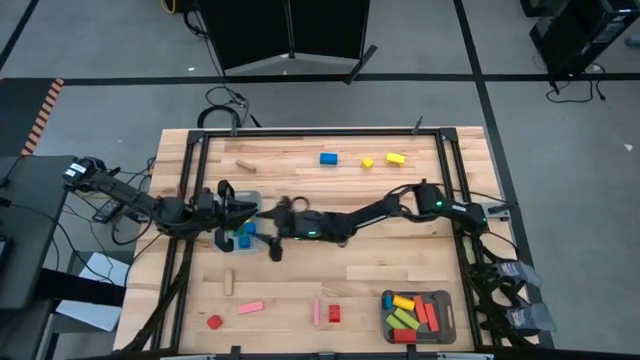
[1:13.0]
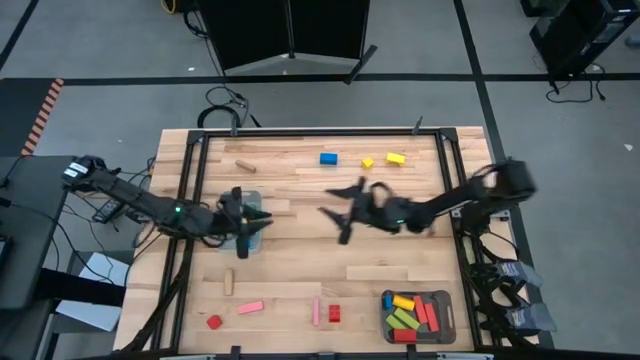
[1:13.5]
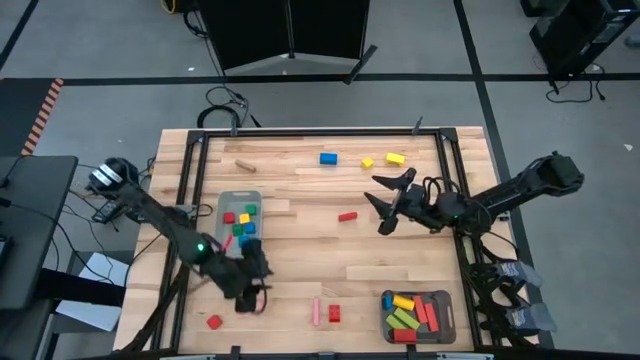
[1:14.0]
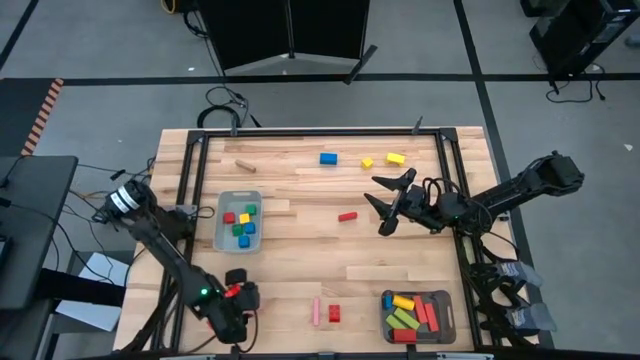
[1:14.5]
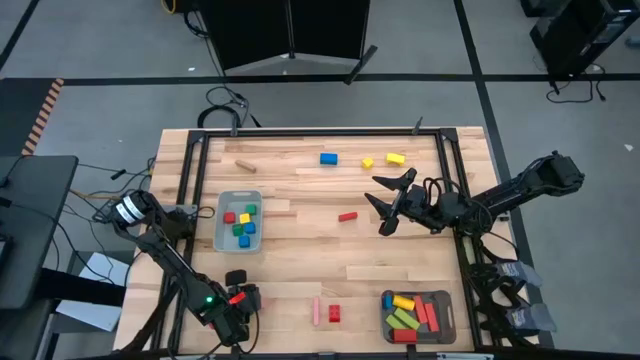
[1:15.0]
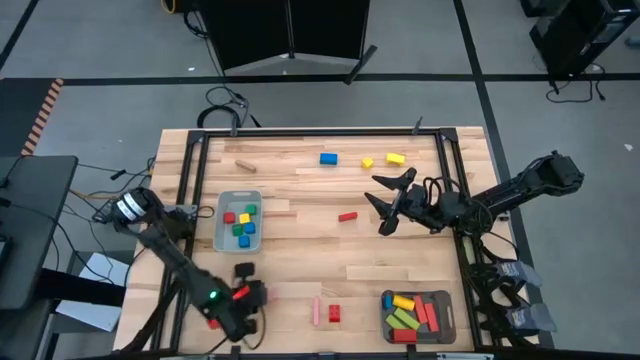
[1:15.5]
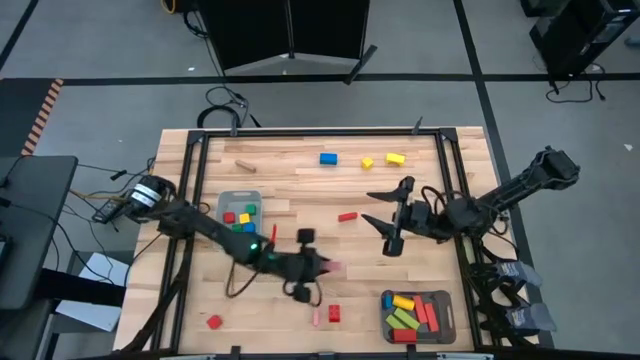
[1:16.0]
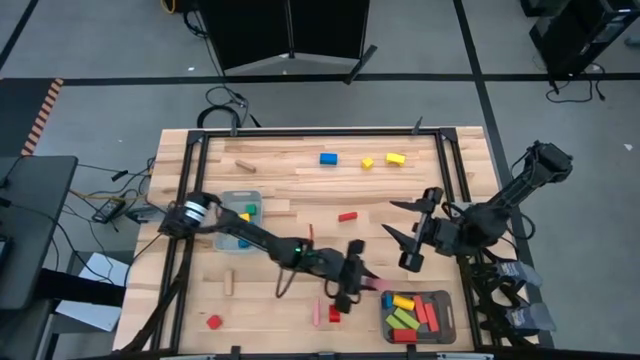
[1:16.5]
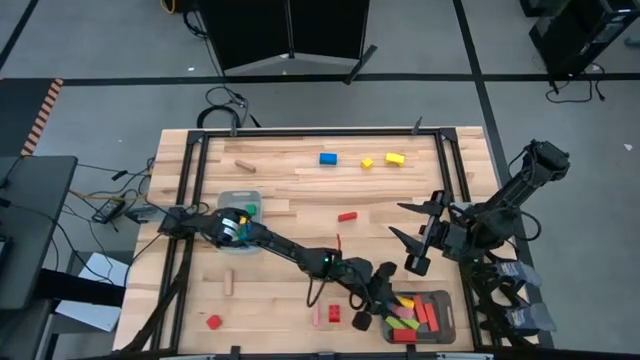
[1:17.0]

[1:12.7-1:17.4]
Task: Sort blocks by size
Put the left pink block into the black bin

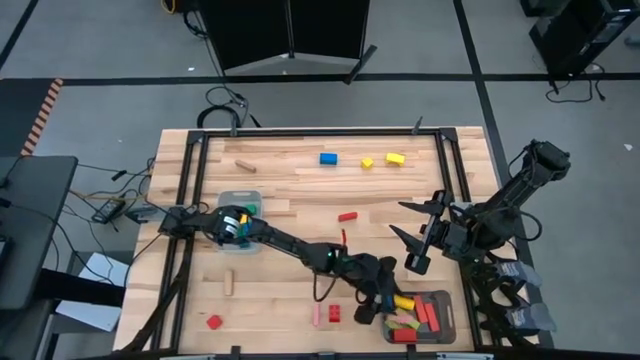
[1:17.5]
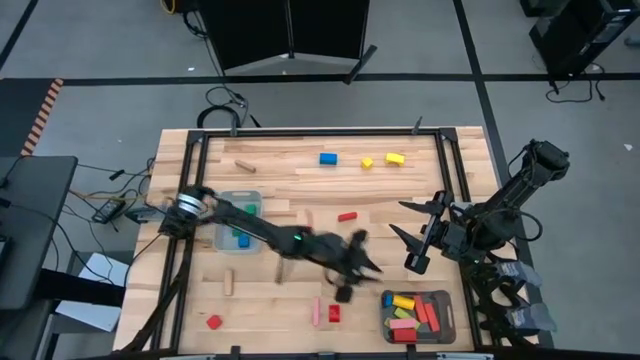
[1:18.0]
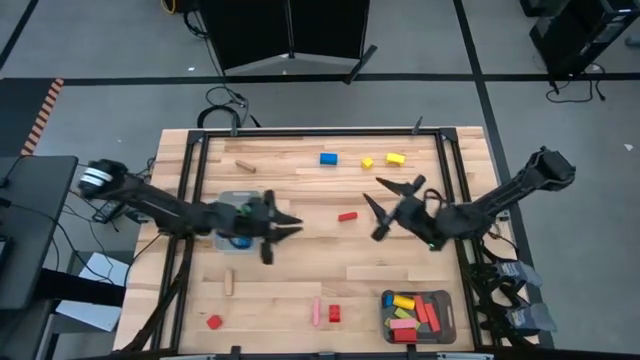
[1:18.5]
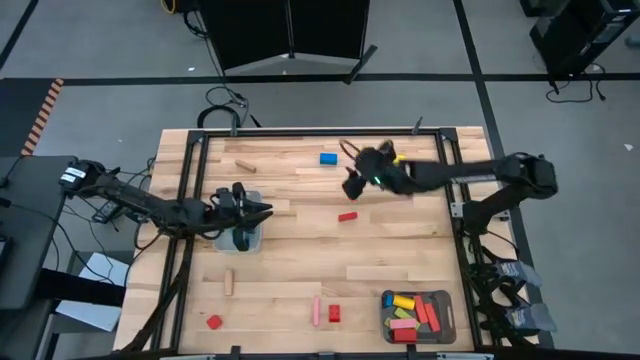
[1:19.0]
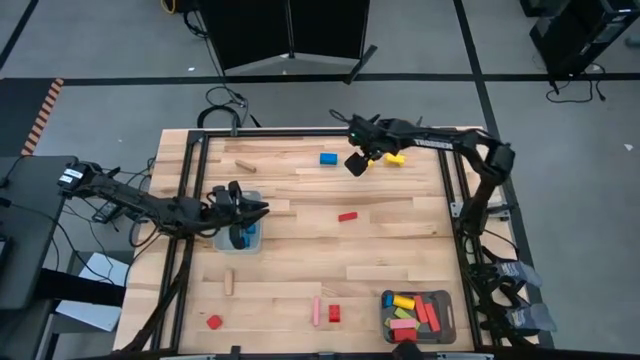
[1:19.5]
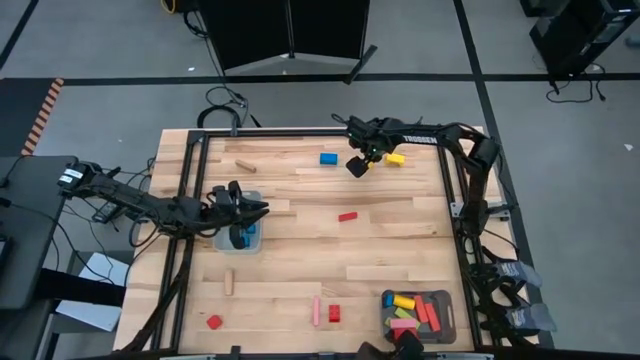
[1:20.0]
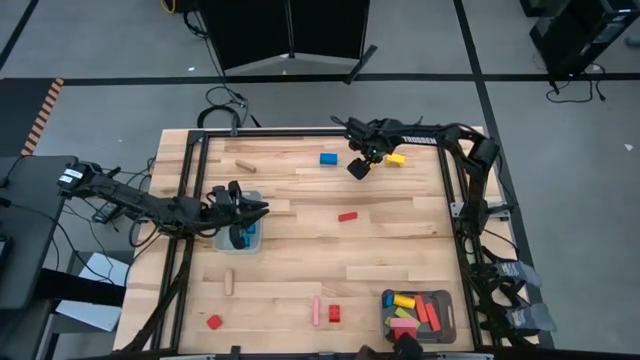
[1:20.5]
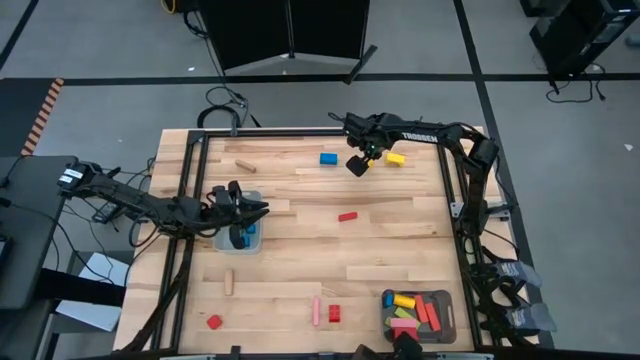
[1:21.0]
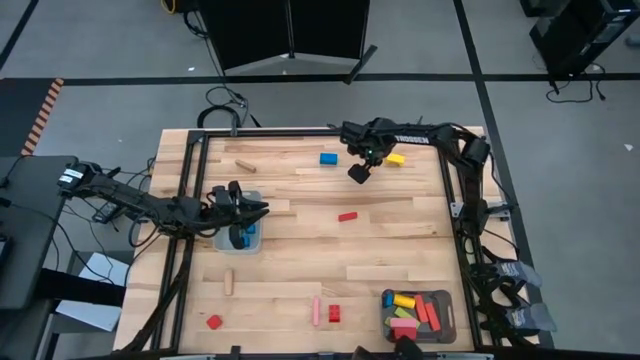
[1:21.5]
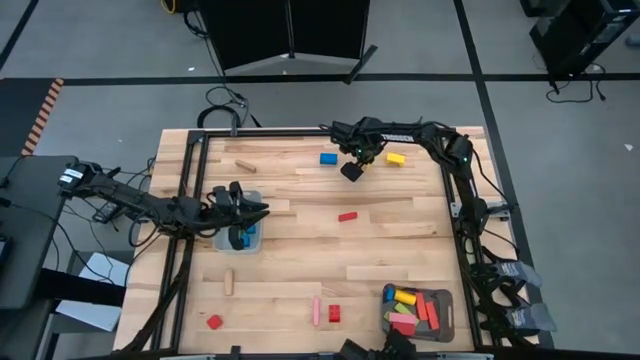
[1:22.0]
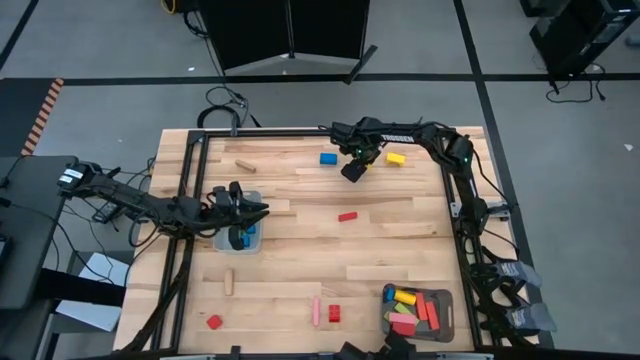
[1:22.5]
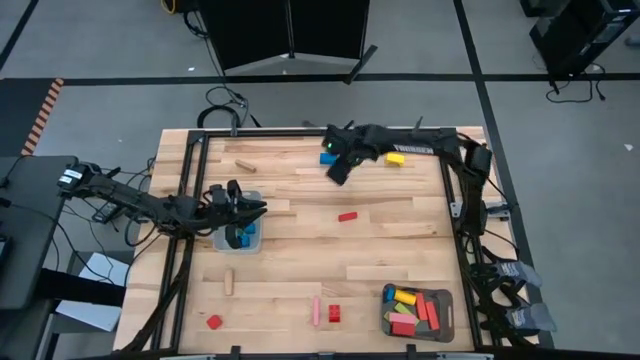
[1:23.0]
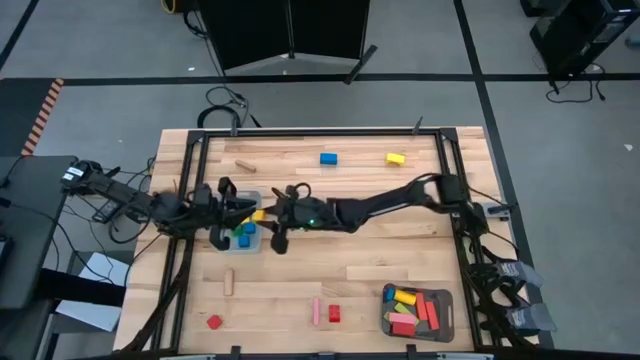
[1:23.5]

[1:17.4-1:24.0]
Put the left yellow block into the grey bin

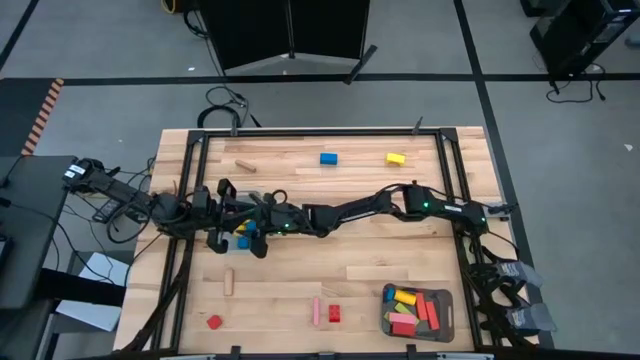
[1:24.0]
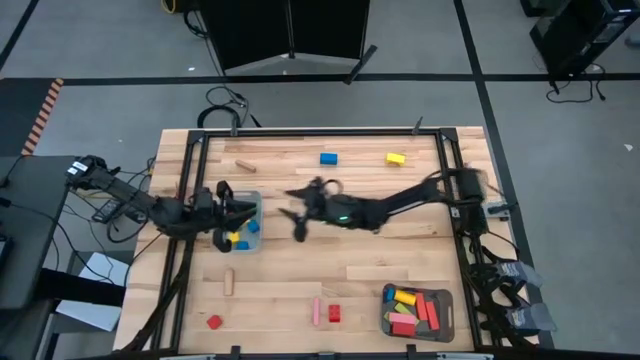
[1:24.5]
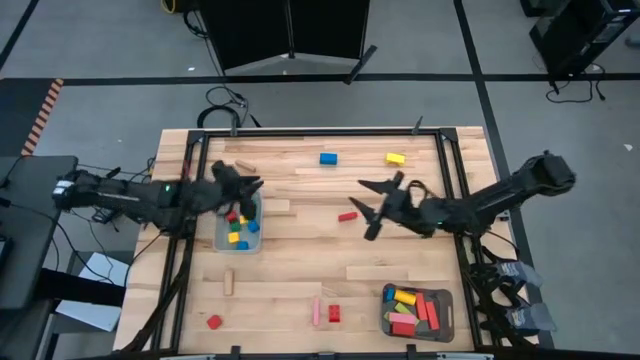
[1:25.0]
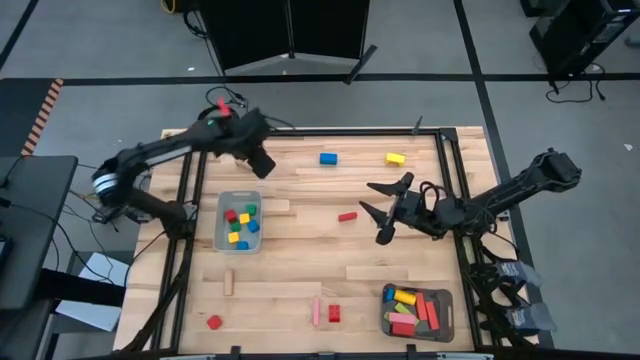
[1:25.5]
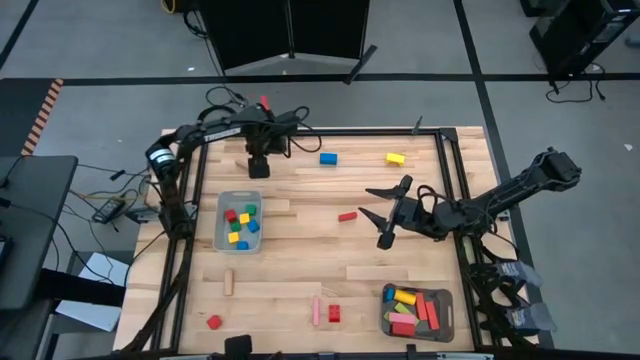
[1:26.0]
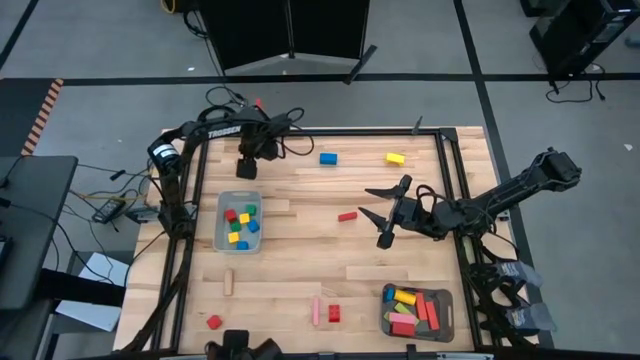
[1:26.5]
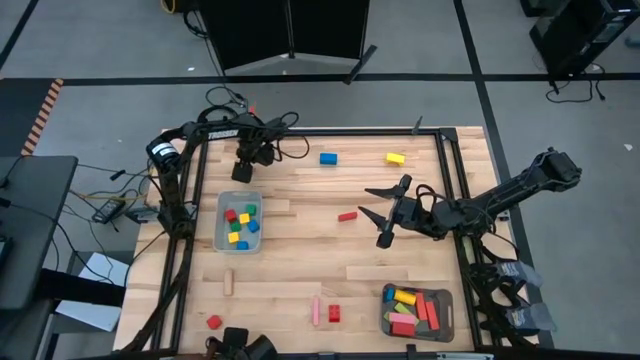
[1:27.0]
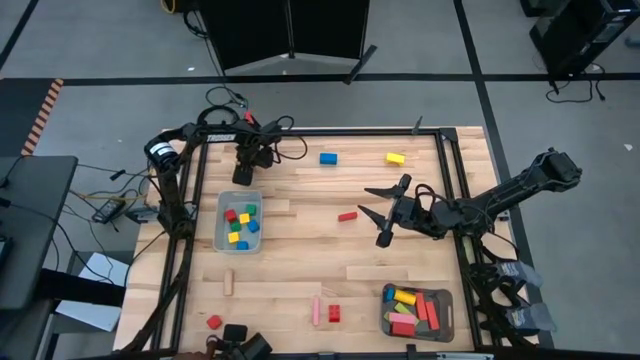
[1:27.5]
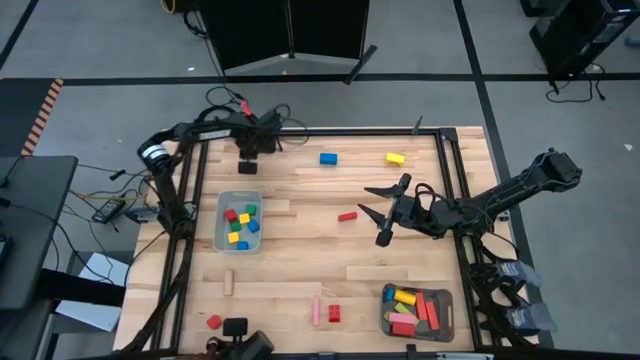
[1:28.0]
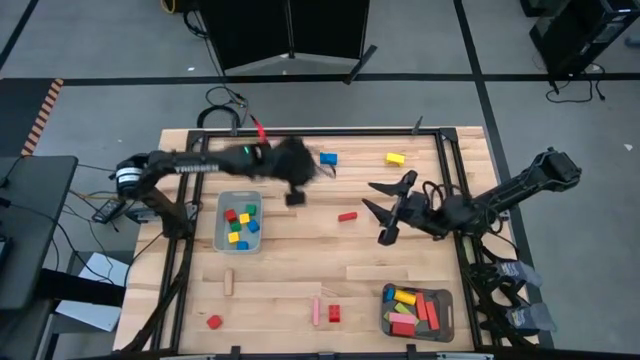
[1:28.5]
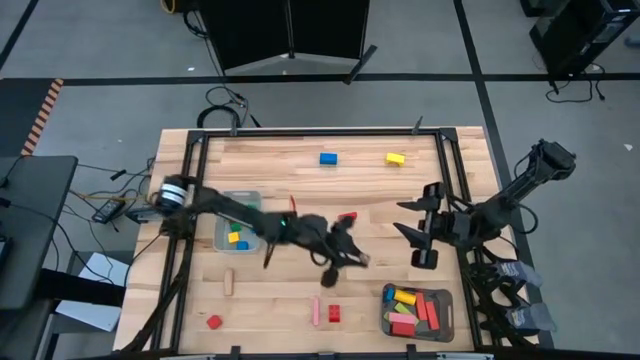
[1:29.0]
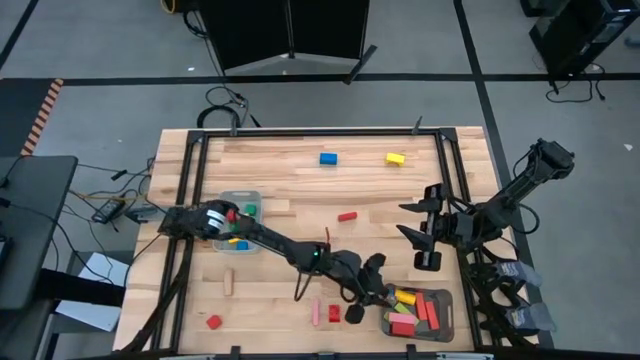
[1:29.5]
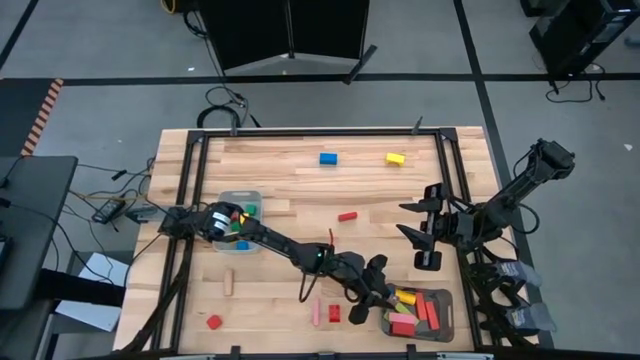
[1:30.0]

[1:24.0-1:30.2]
Put the top brown block into the black bin

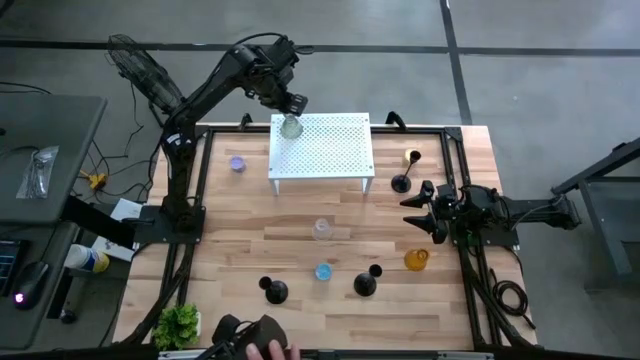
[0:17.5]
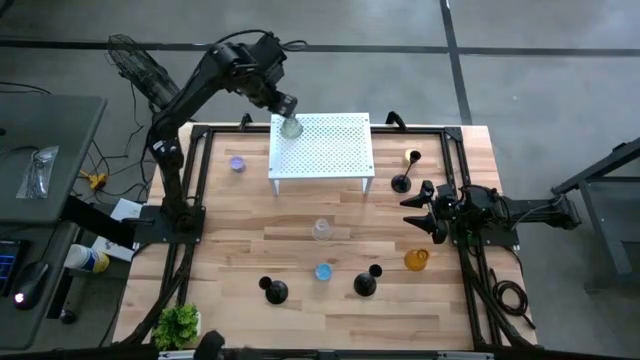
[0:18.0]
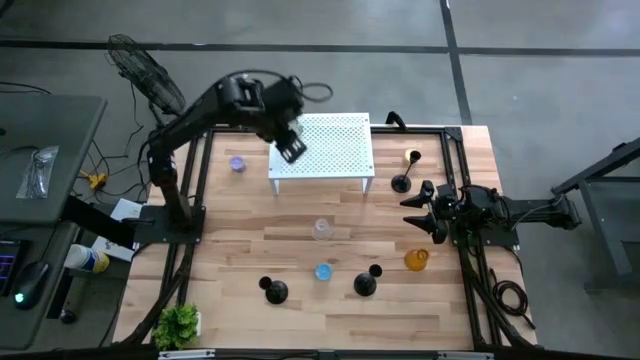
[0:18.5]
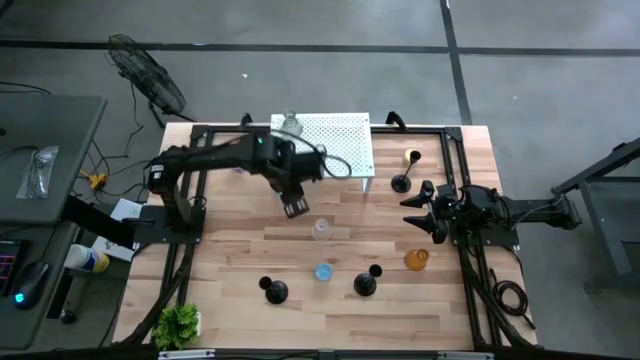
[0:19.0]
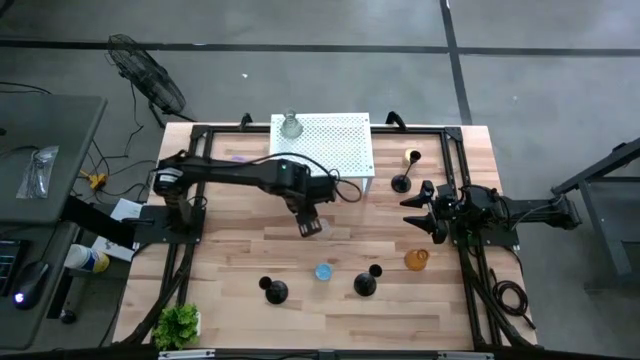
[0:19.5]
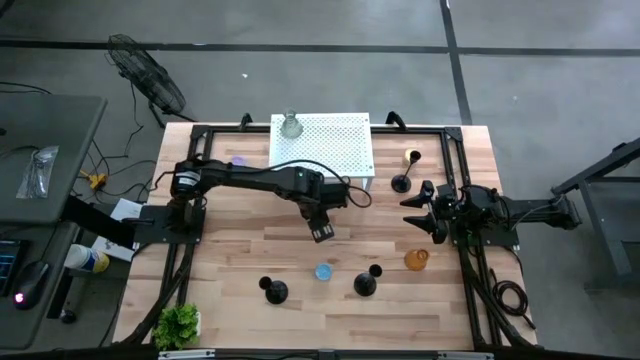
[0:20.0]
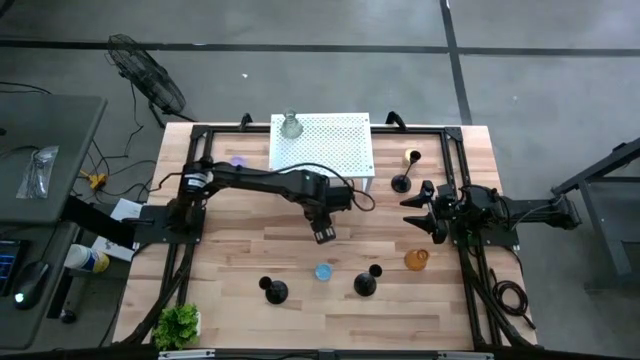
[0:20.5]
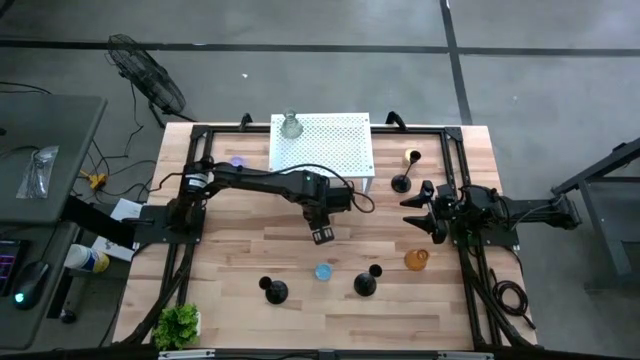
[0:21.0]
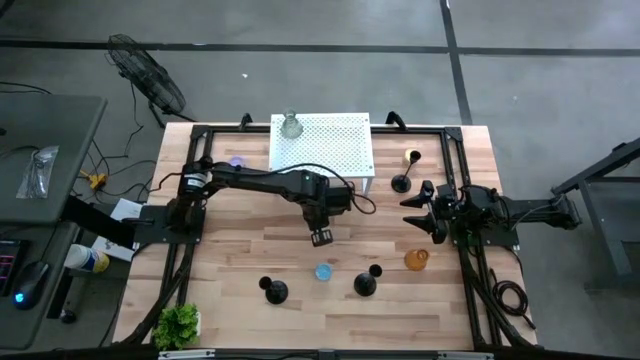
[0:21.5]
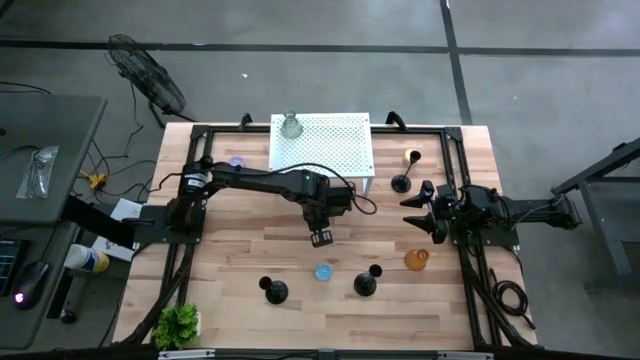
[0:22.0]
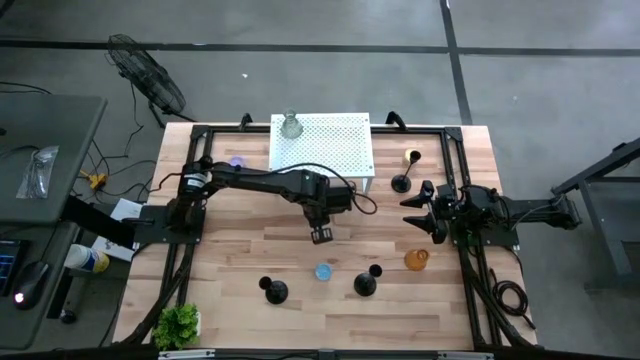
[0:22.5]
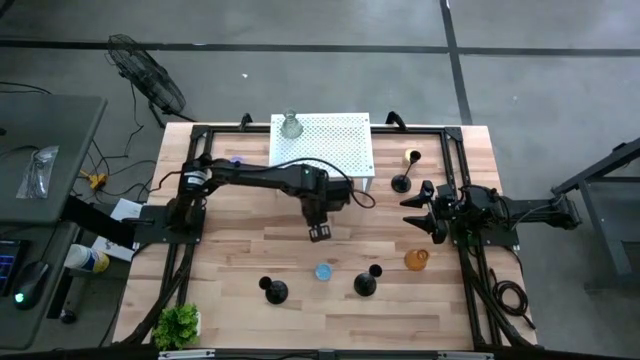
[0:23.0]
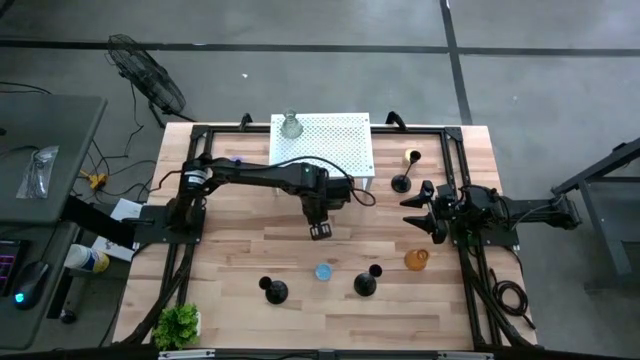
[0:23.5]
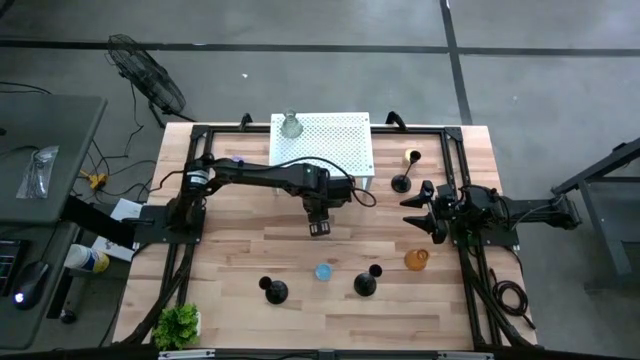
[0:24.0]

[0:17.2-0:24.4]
Task: Pick & Place candle stick holders
Put the transparent glass candle holder on the shelf aligned with the other glass candle holder
